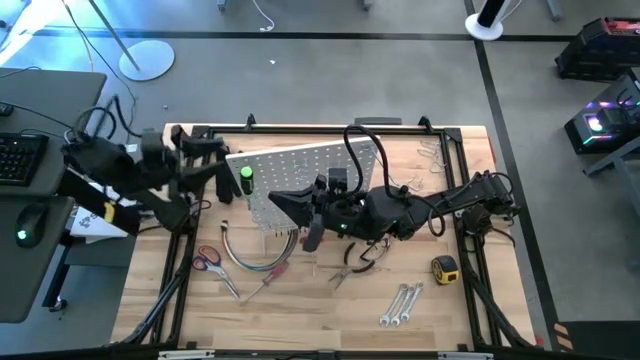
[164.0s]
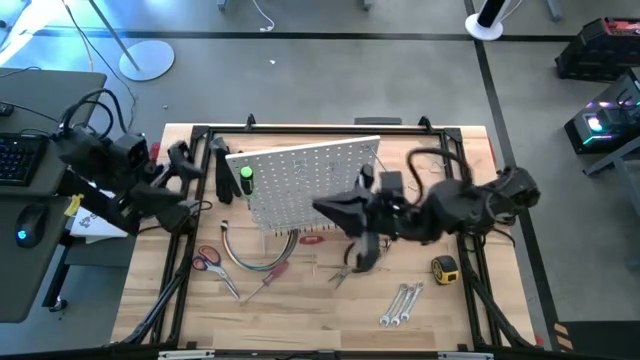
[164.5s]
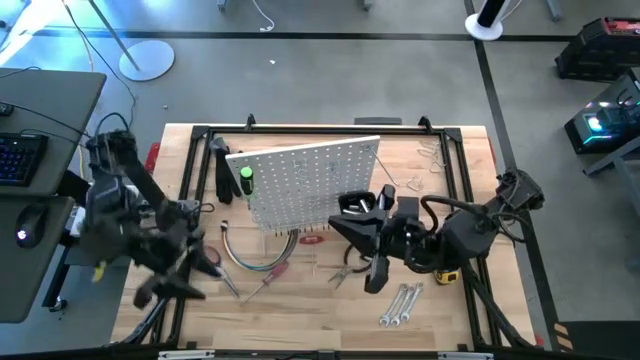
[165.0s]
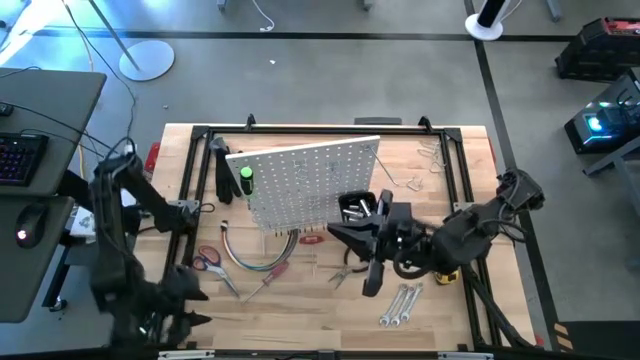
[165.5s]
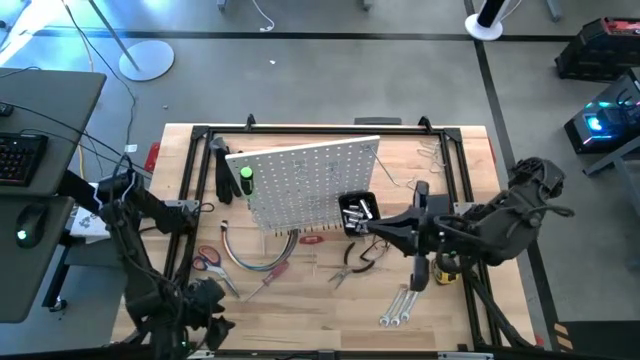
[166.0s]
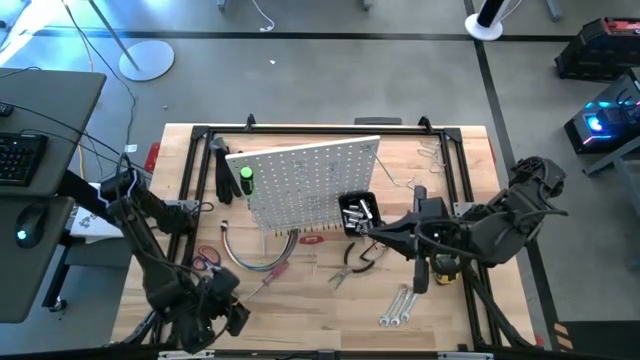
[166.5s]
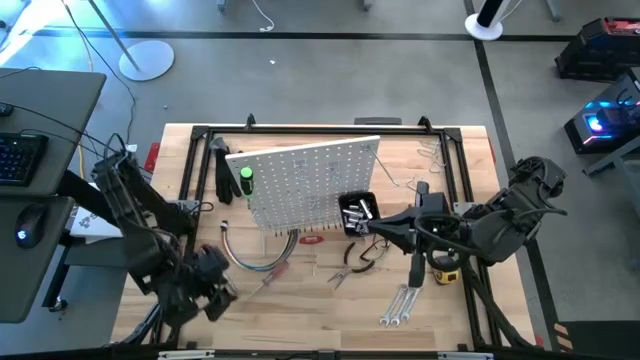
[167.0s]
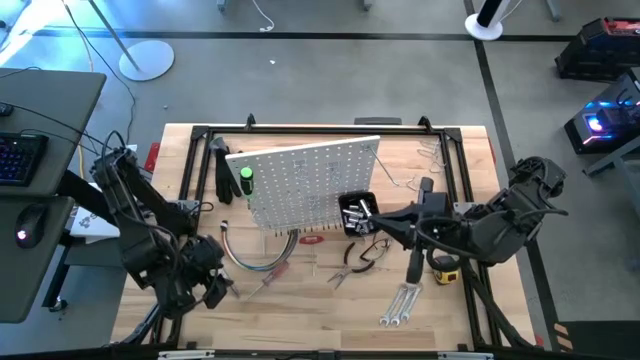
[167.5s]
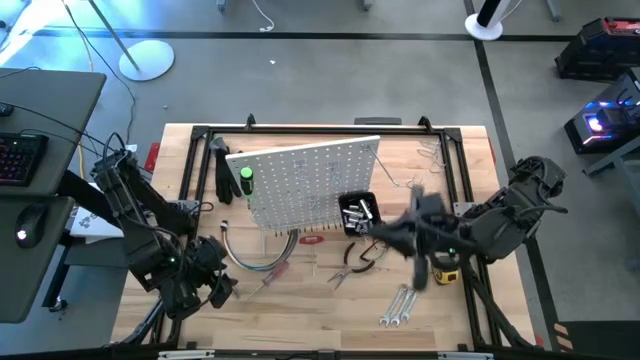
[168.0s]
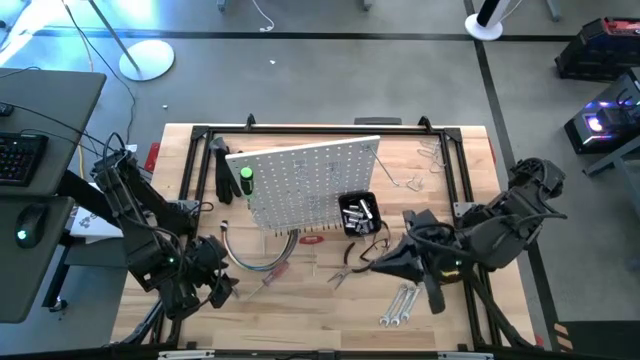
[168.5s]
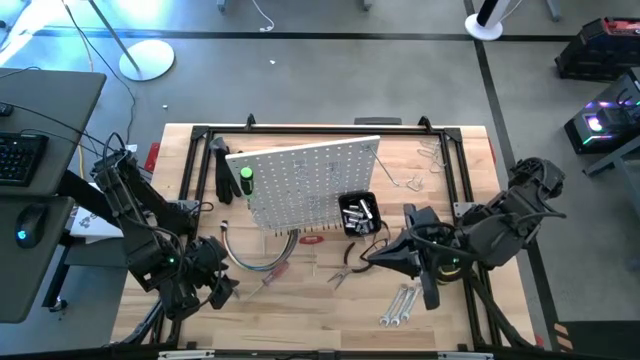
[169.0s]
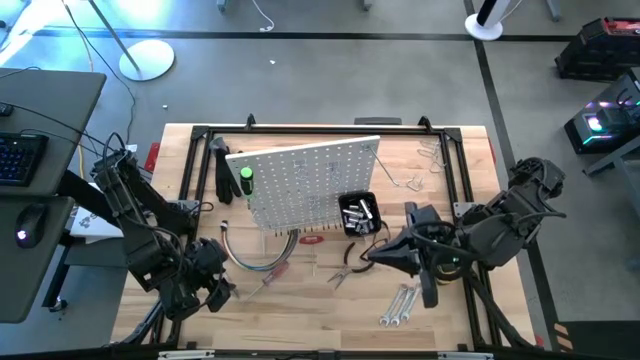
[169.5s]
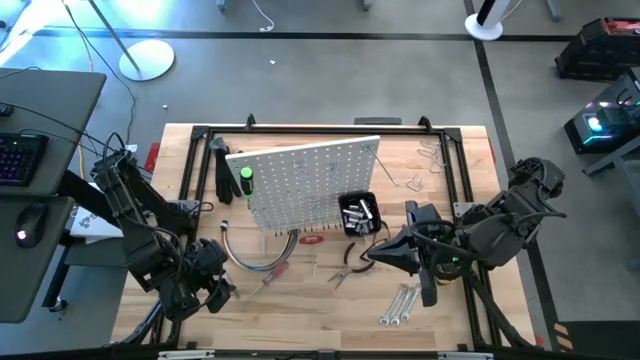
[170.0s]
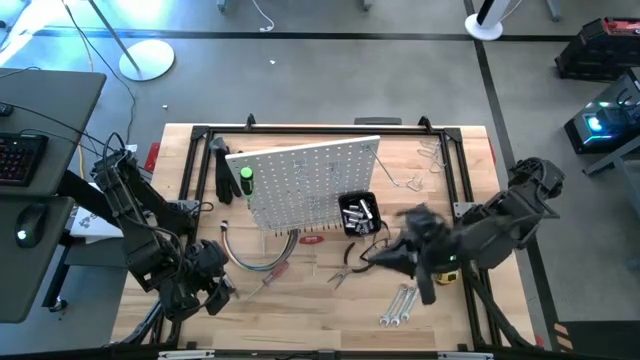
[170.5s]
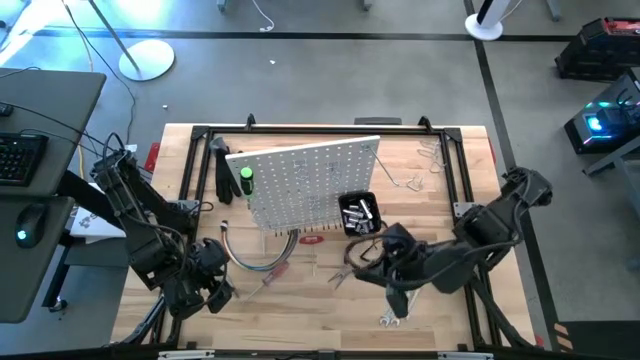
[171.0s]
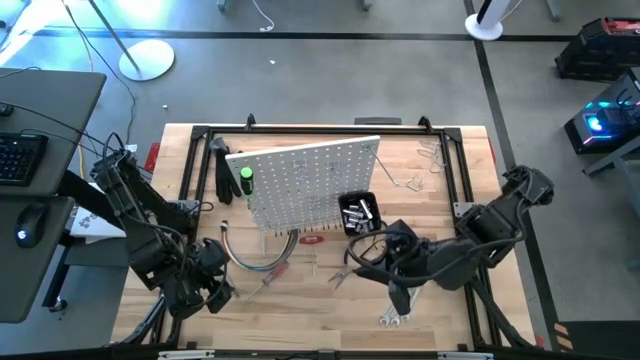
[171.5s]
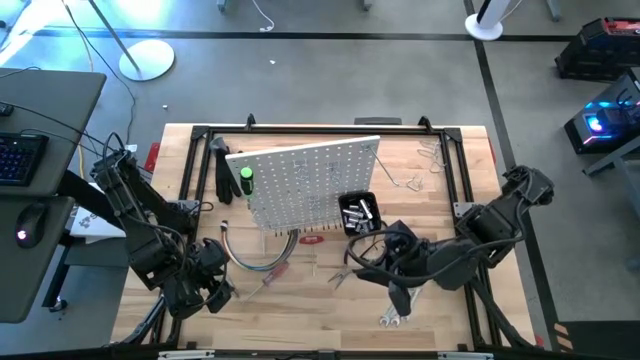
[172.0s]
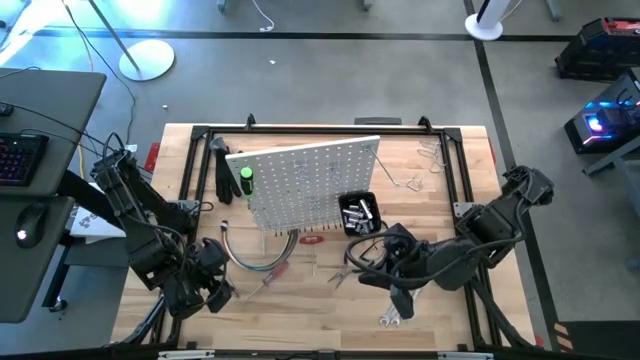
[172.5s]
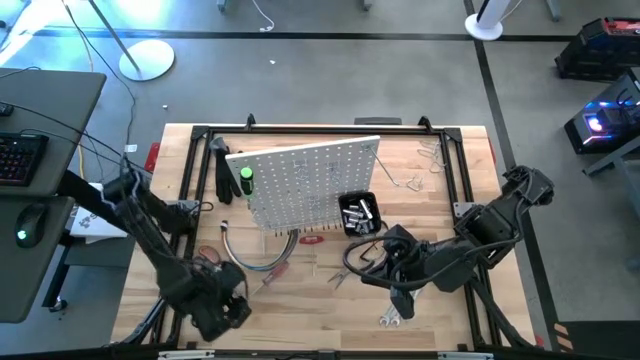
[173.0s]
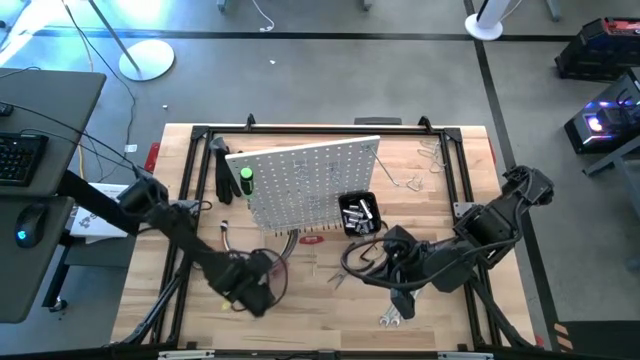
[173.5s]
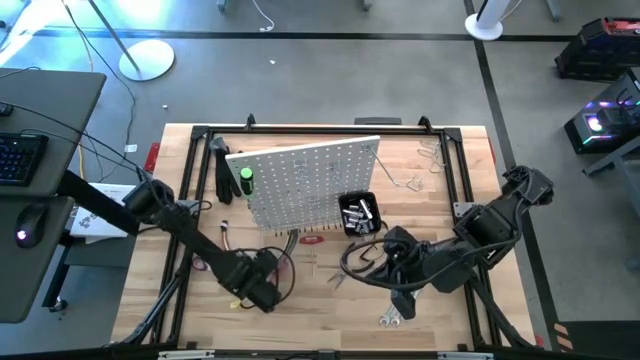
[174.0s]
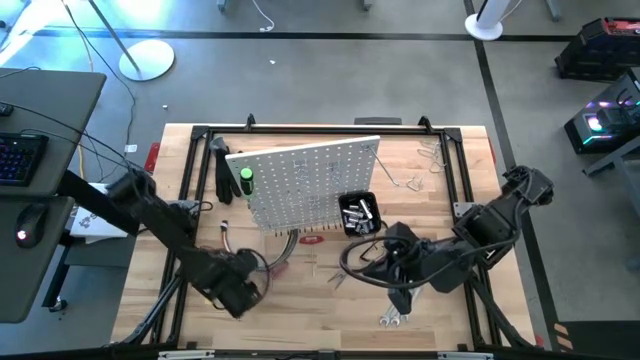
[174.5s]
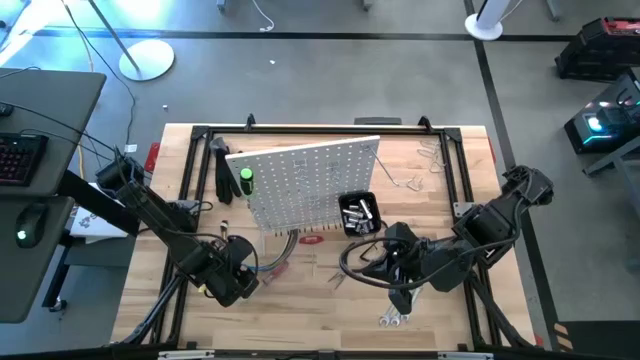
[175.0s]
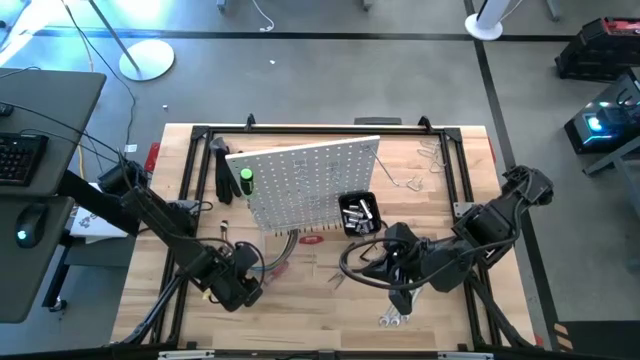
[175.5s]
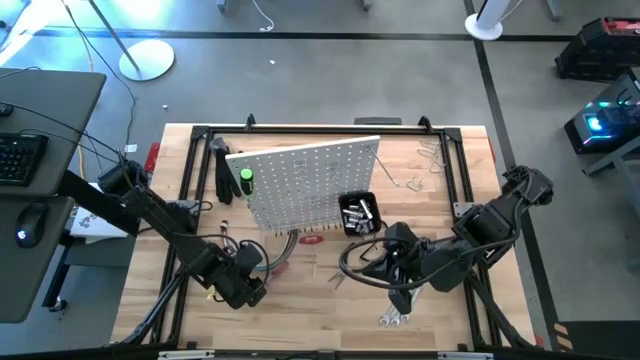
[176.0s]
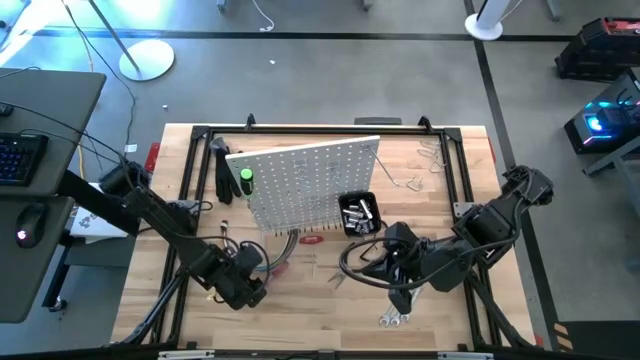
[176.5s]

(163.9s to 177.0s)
Task: Hang tools onto peg board
Hang the red screwdriver on the peg board

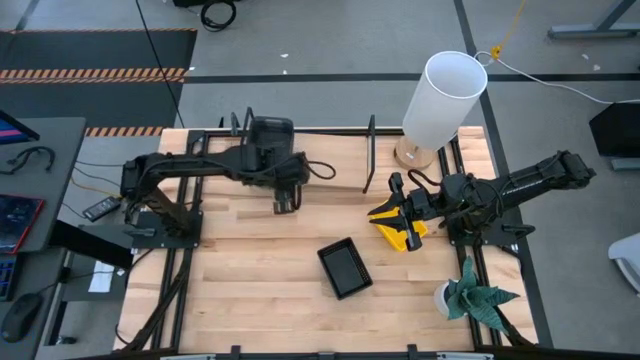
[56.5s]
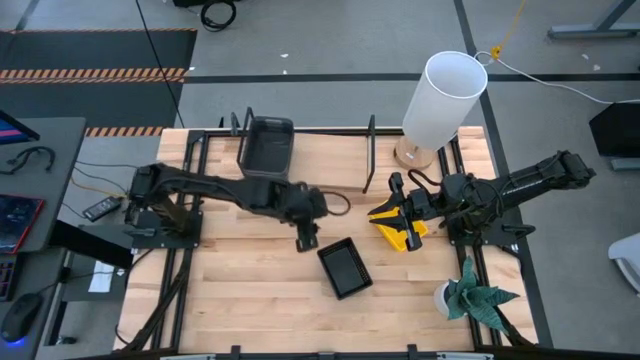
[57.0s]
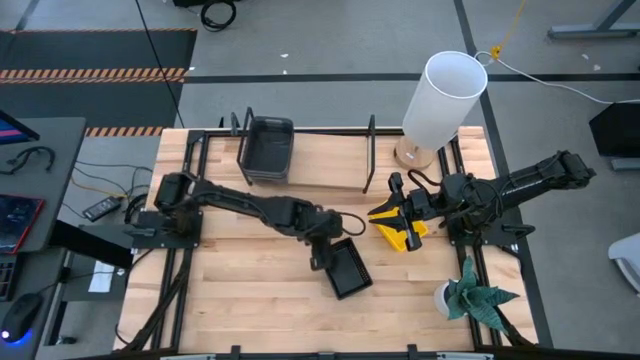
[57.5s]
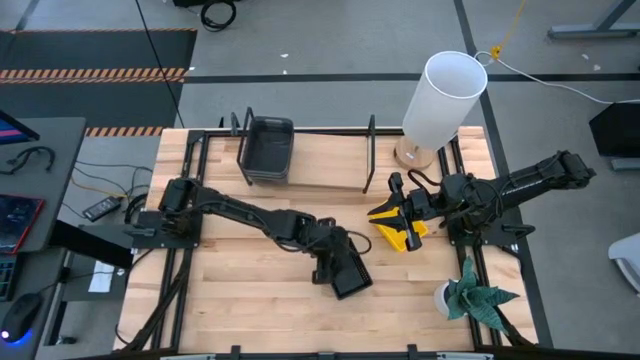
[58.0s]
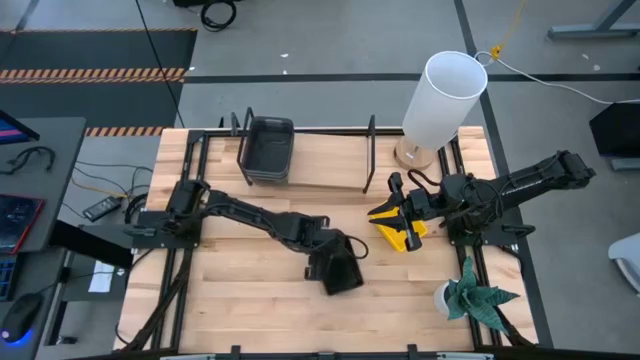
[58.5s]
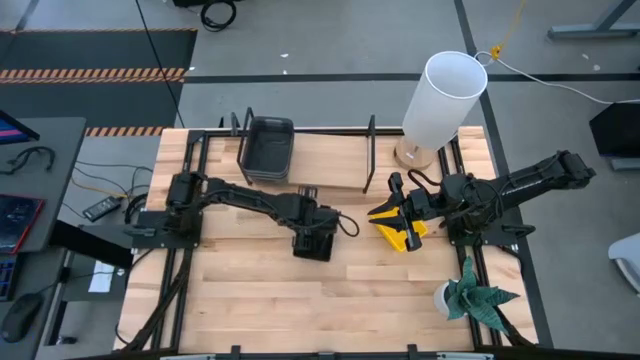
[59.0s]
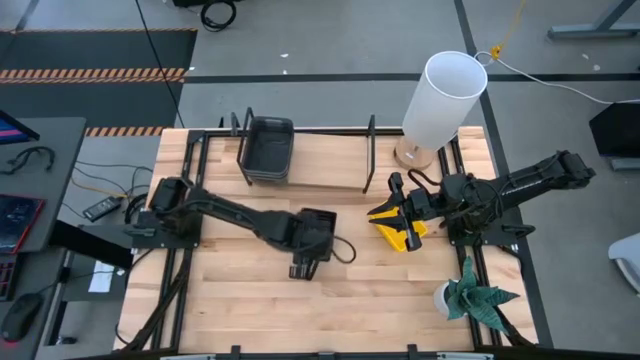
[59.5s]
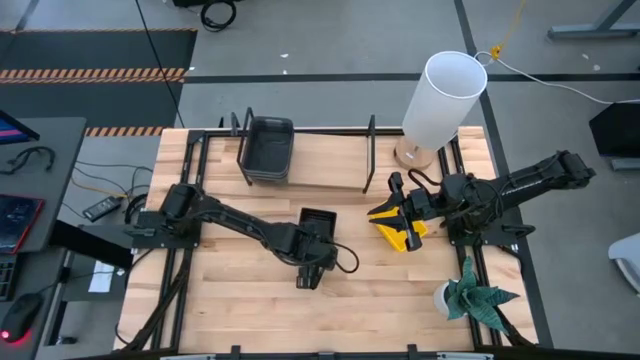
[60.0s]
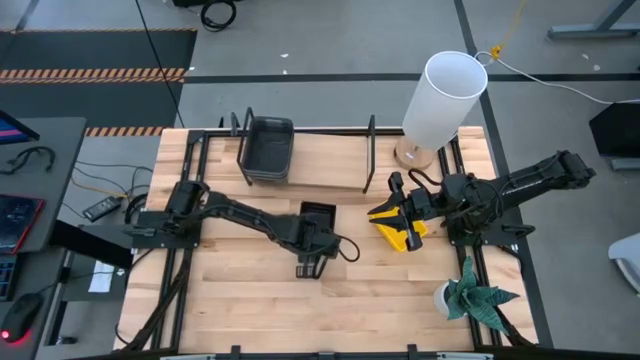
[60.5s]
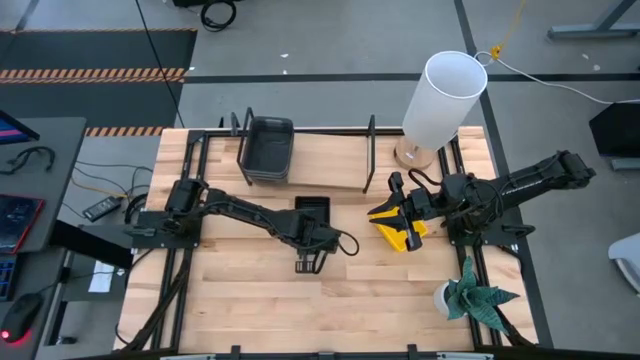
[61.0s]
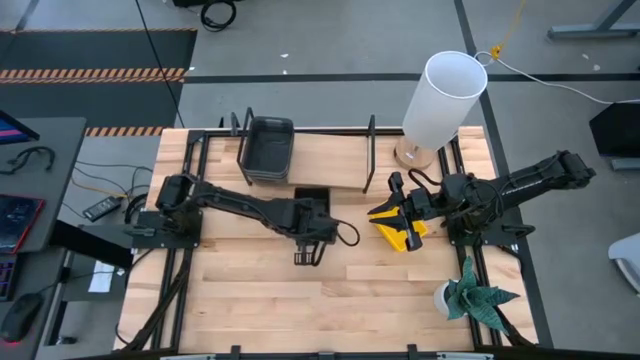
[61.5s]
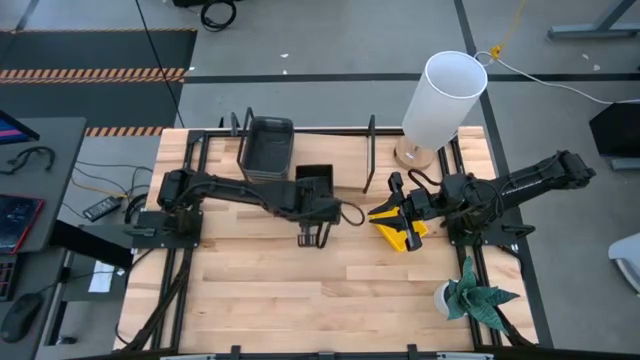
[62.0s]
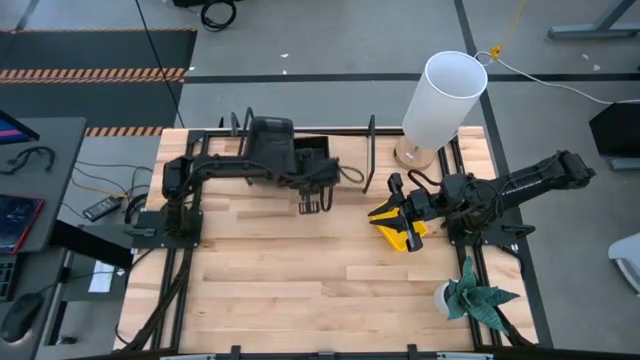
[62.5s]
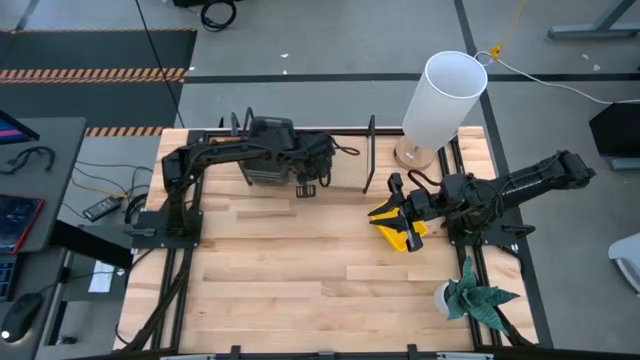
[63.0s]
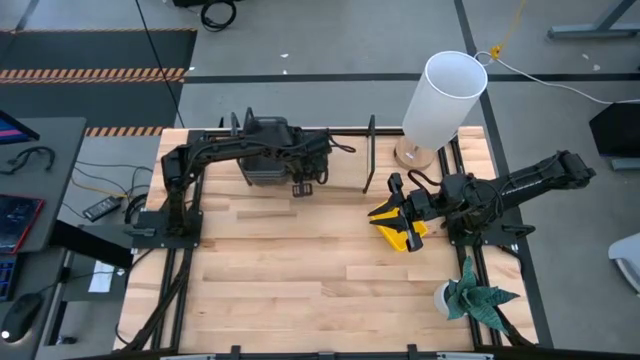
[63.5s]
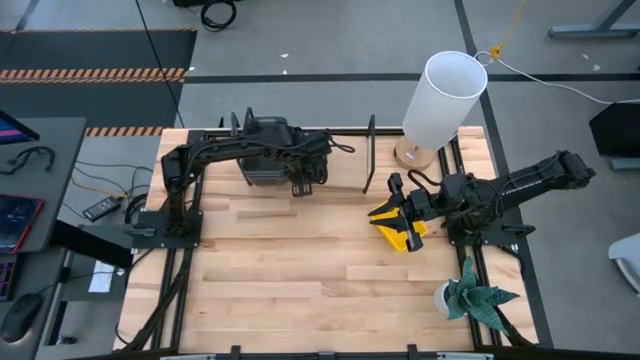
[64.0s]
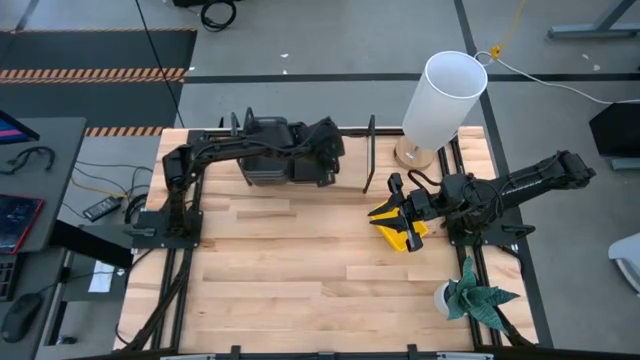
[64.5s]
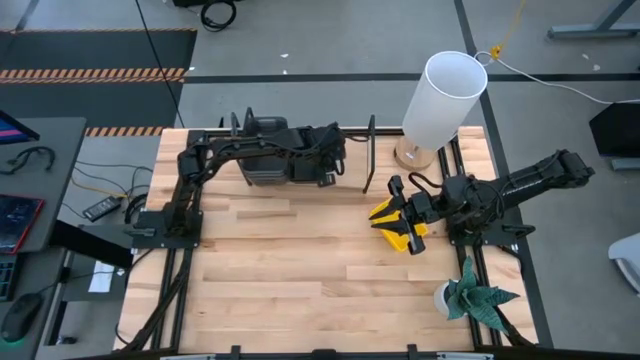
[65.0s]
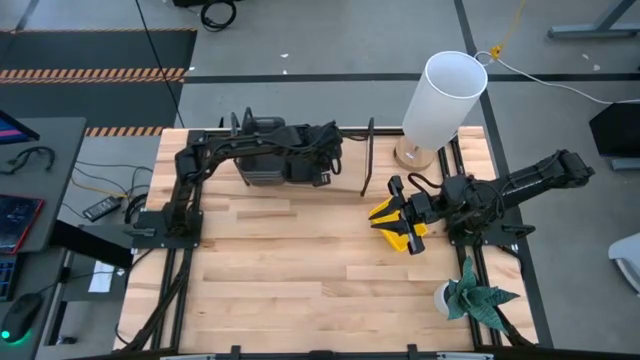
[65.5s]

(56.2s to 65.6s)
Task: Stack baskets on shelf by color
Put the stacked black baskets on the shelf
